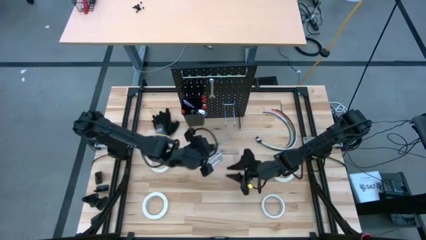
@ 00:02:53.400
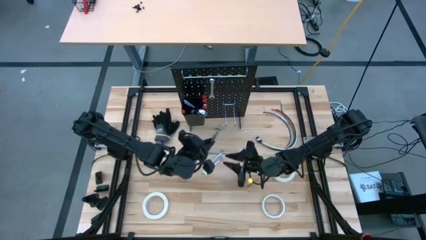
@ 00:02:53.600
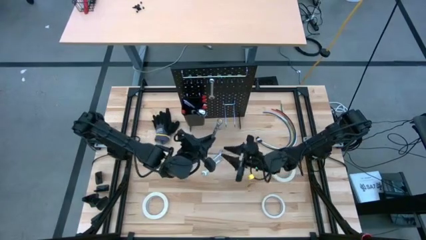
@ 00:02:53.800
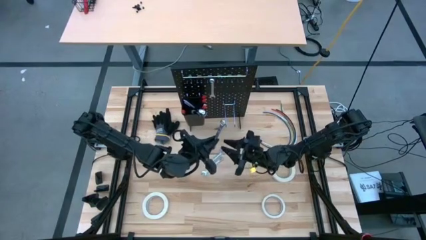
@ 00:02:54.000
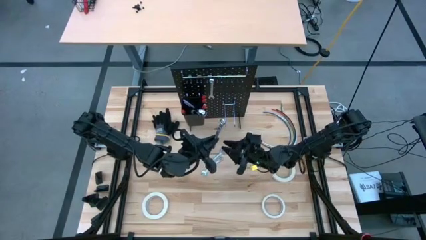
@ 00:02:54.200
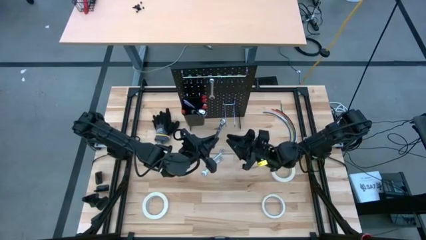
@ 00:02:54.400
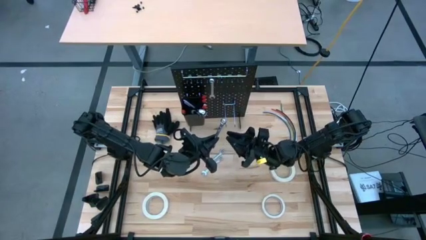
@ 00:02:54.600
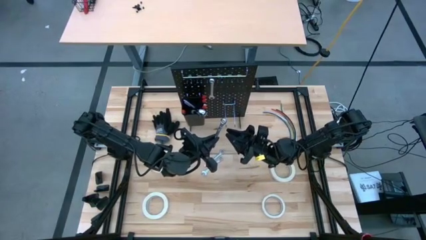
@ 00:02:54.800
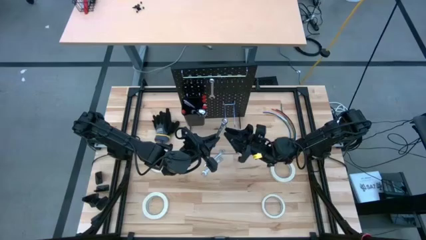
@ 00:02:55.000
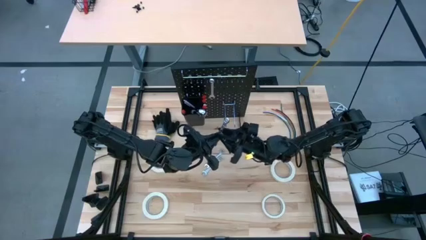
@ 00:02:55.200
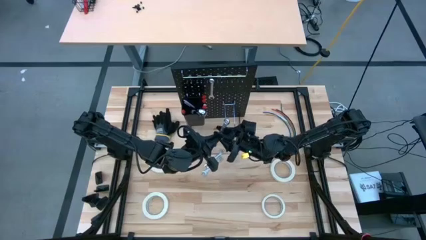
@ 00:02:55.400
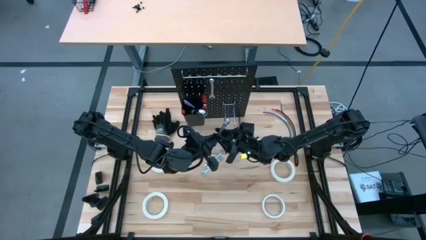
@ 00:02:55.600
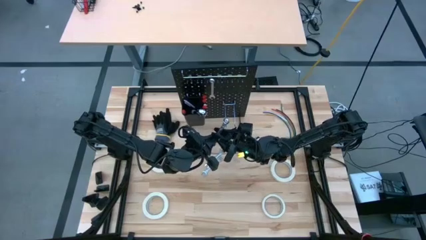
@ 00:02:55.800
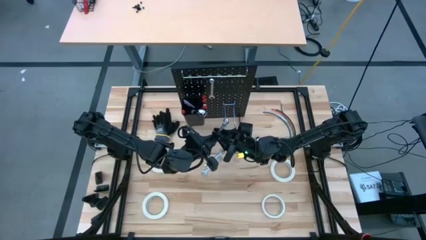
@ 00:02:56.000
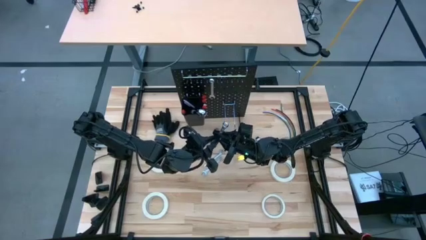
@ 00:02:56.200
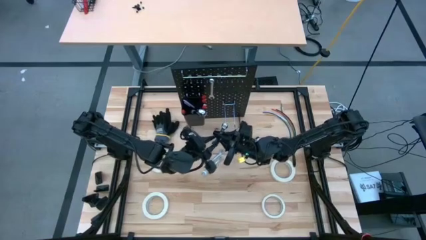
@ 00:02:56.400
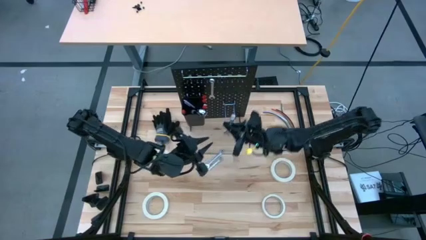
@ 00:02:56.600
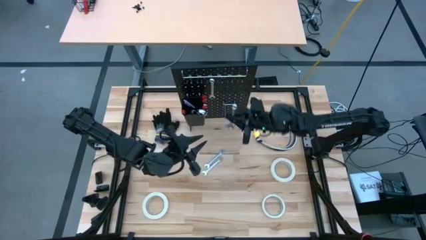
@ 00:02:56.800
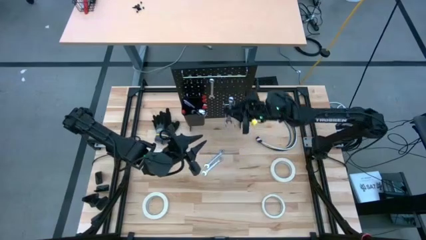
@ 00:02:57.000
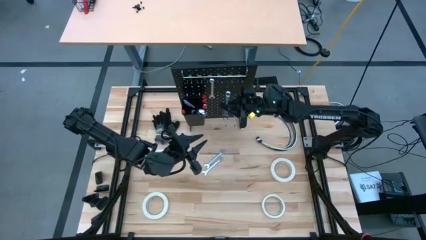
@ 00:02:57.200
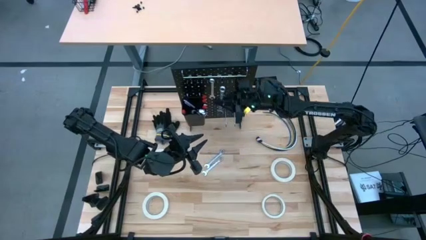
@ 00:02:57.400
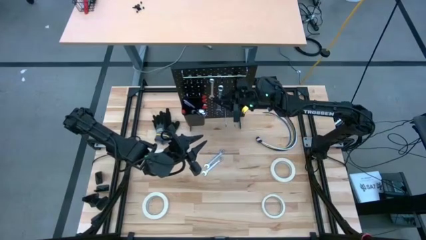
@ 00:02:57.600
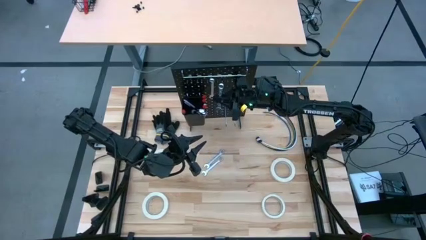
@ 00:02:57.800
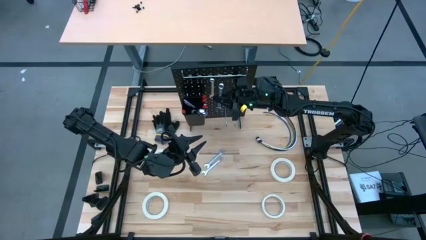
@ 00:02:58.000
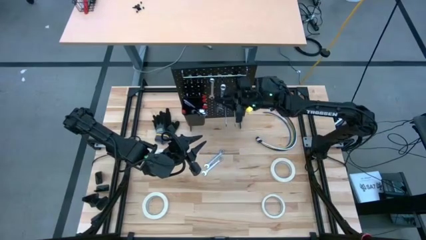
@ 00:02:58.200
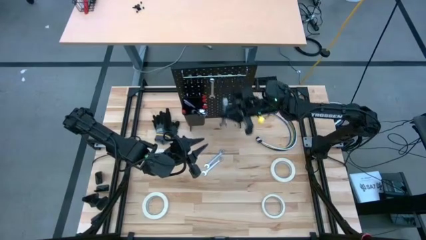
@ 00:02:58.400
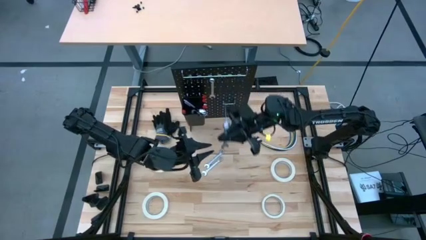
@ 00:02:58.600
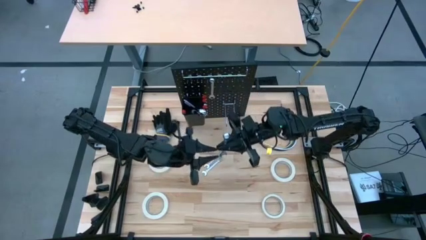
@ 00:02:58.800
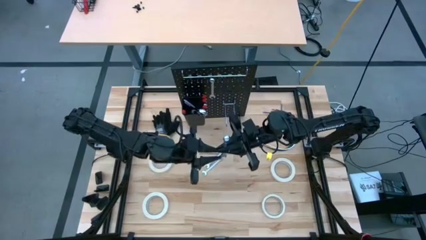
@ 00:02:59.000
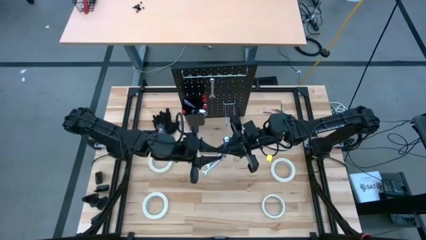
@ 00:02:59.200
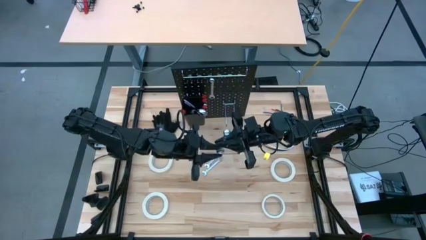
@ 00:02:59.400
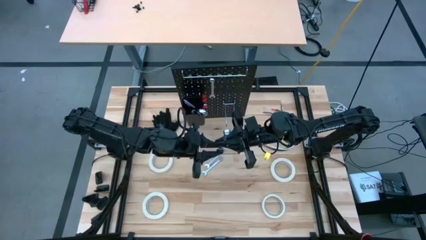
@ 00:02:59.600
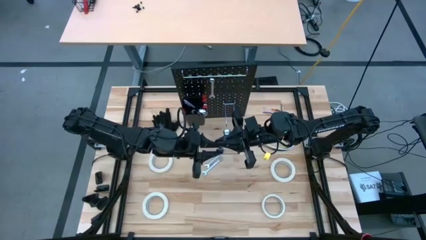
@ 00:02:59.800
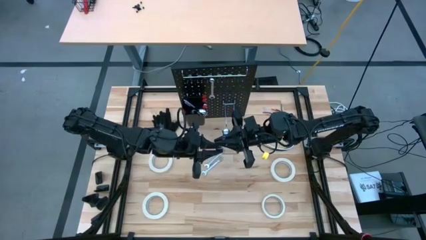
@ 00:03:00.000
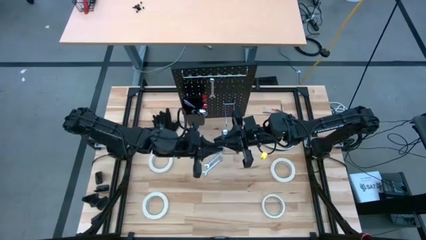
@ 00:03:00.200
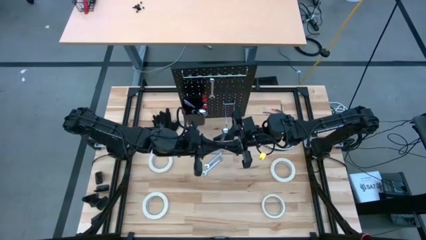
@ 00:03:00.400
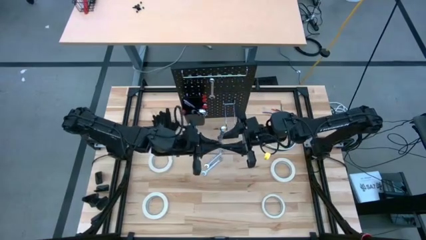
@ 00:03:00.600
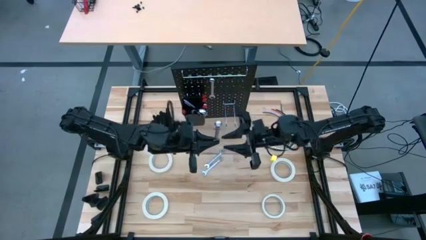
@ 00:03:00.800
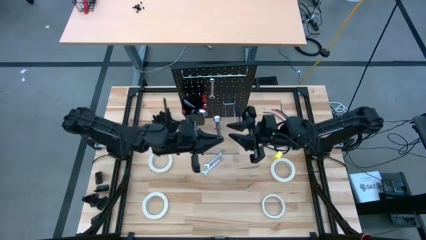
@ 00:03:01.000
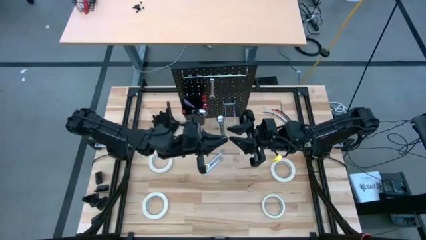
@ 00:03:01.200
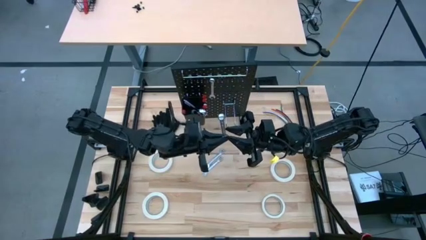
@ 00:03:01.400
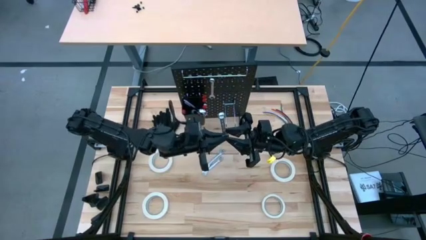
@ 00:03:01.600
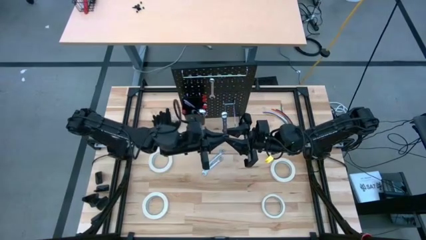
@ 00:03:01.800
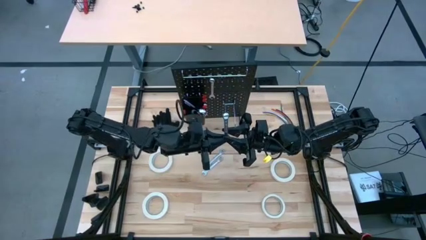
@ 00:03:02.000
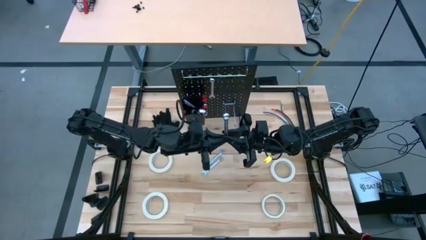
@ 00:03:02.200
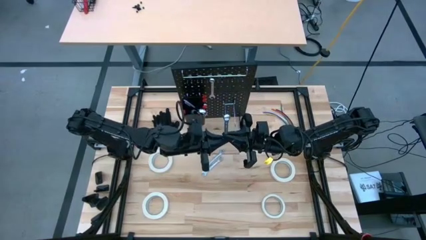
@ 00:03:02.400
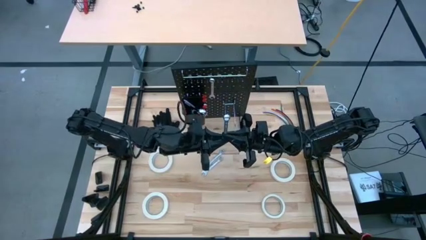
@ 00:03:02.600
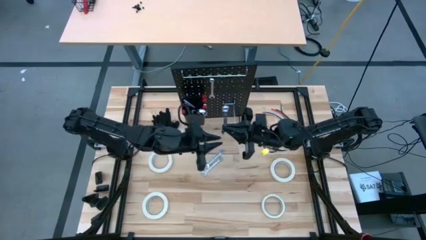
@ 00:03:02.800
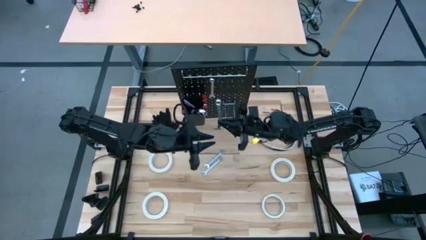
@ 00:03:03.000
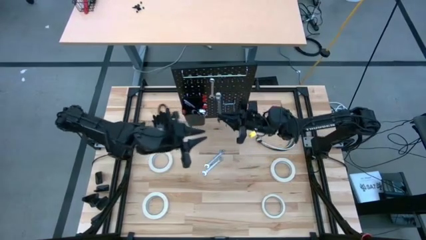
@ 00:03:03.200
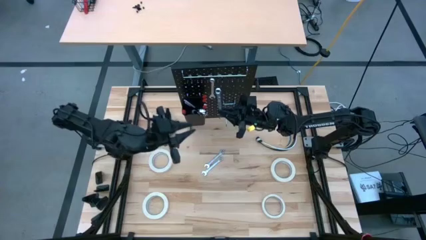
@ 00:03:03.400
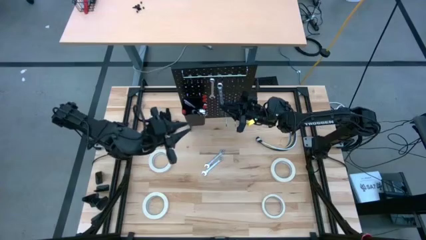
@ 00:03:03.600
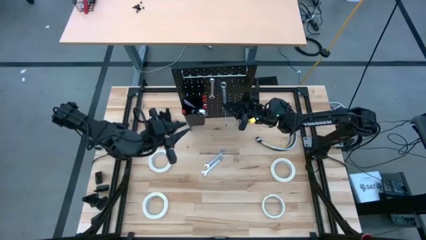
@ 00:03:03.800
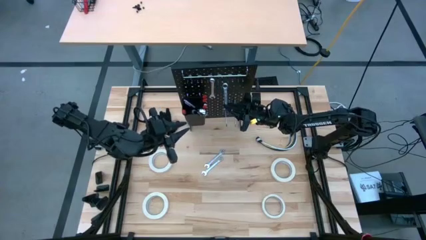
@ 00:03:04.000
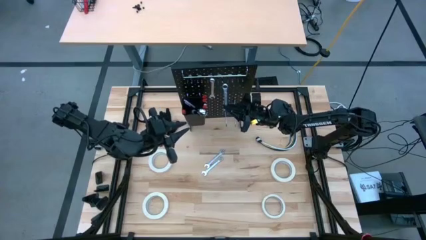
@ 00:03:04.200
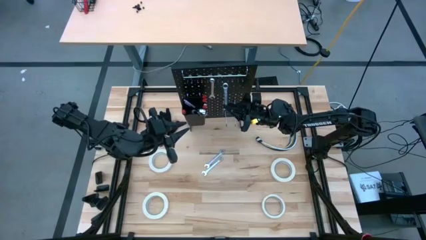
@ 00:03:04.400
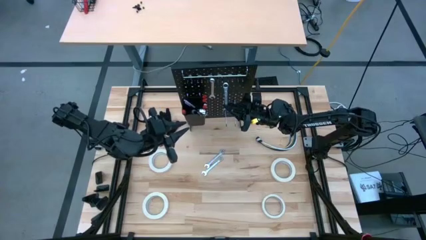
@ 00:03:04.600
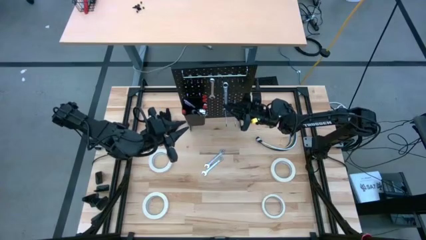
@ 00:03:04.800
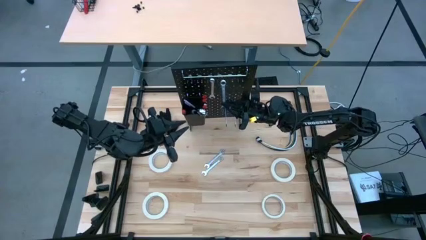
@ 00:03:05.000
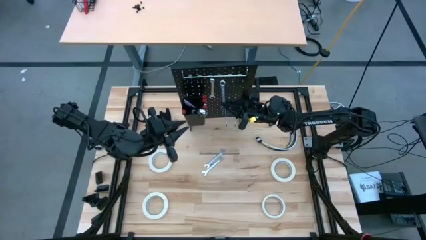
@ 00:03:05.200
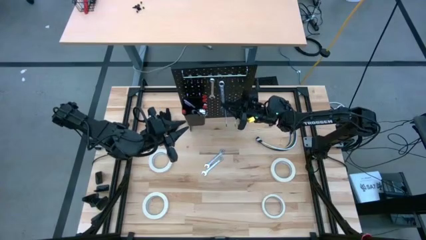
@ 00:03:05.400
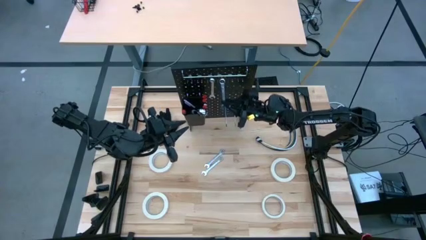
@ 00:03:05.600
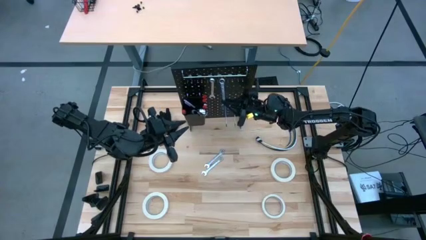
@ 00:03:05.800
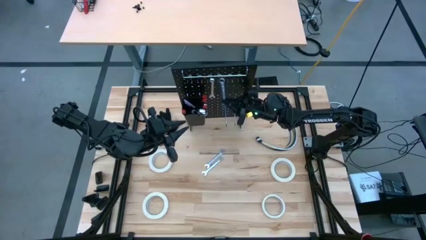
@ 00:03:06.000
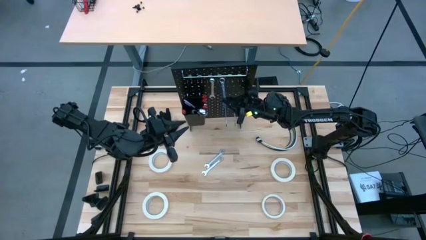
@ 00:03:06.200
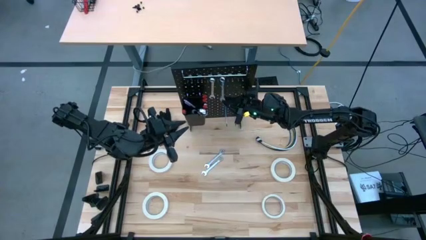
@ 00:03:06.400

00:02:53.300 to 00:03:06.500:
Task: Hang tools onto peg board
Hang the wrench on the peg board
